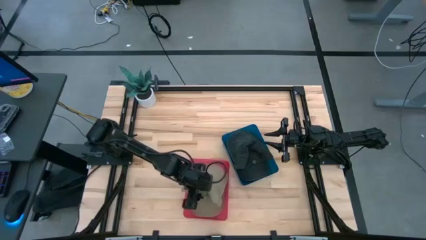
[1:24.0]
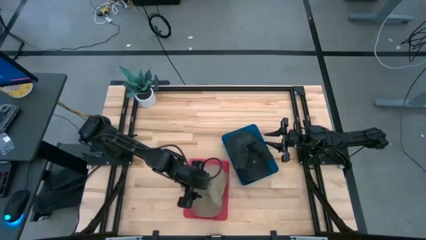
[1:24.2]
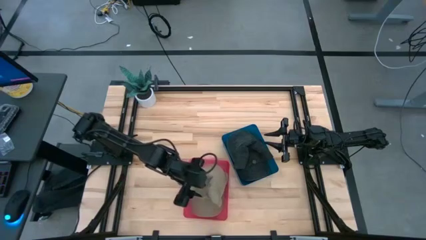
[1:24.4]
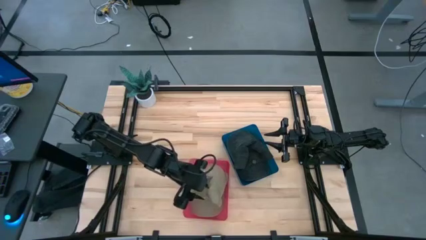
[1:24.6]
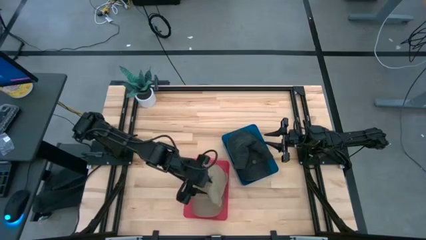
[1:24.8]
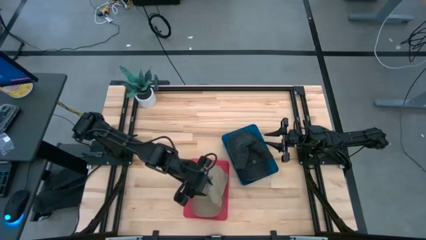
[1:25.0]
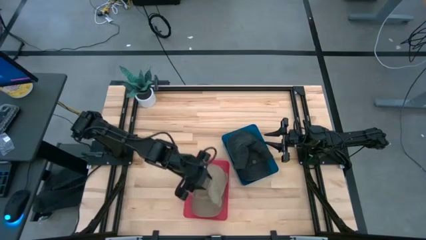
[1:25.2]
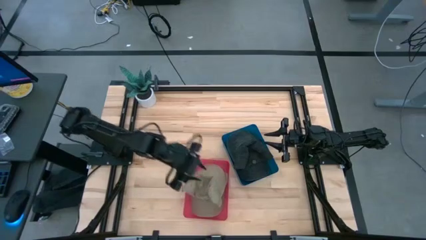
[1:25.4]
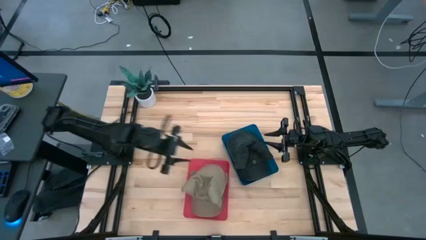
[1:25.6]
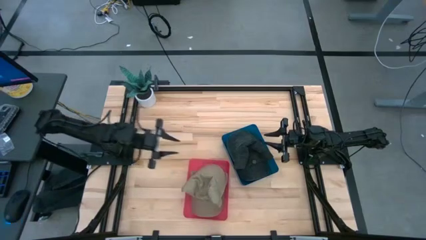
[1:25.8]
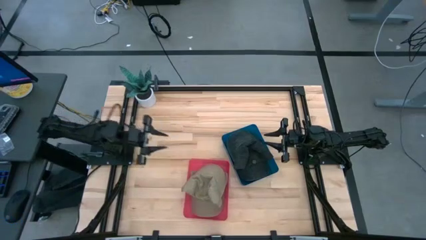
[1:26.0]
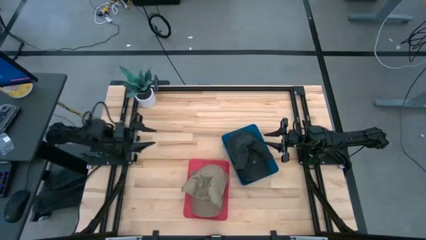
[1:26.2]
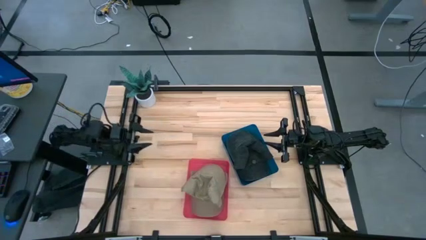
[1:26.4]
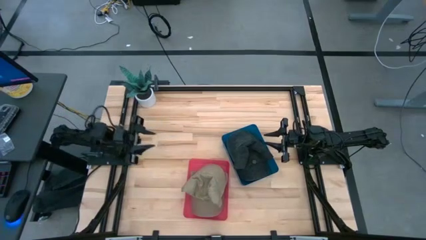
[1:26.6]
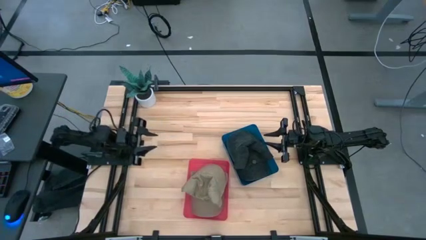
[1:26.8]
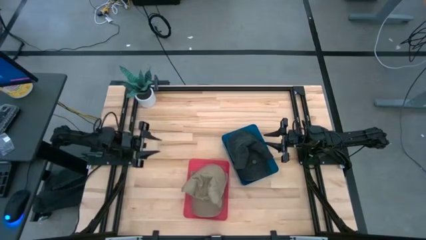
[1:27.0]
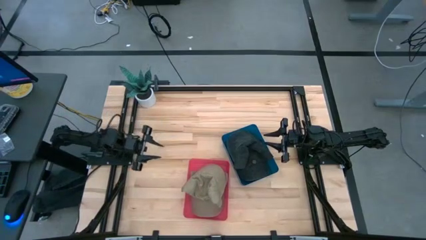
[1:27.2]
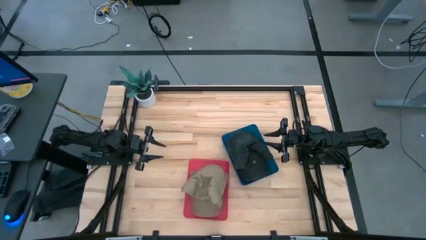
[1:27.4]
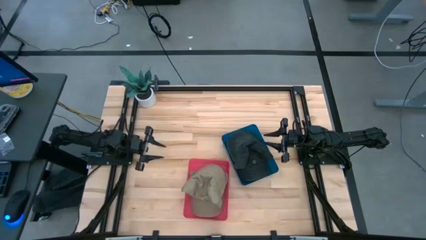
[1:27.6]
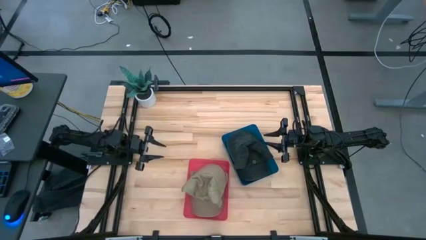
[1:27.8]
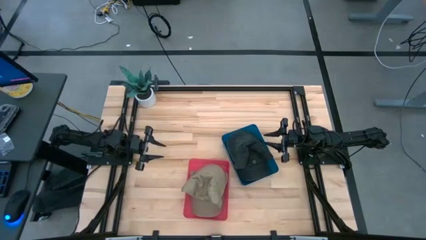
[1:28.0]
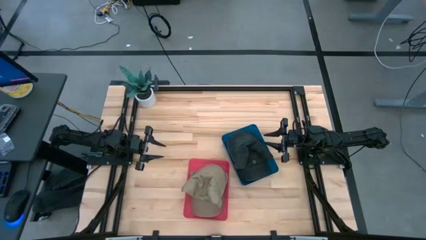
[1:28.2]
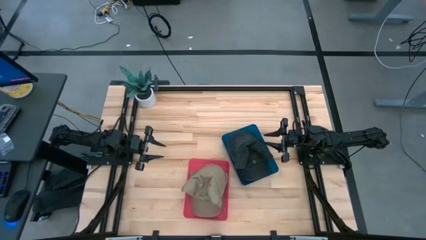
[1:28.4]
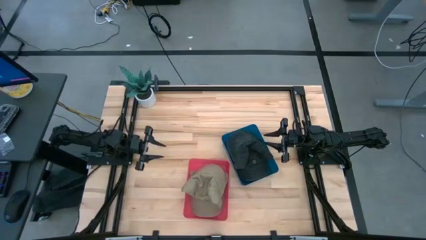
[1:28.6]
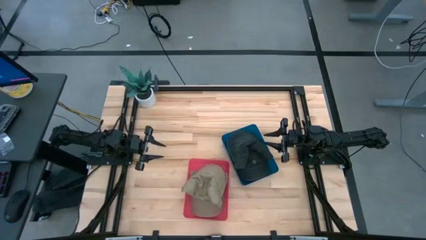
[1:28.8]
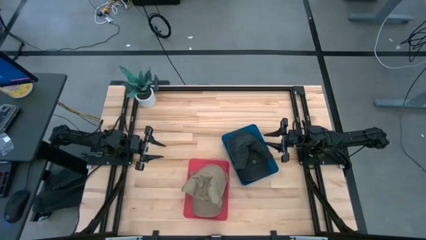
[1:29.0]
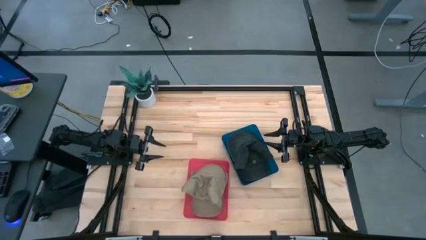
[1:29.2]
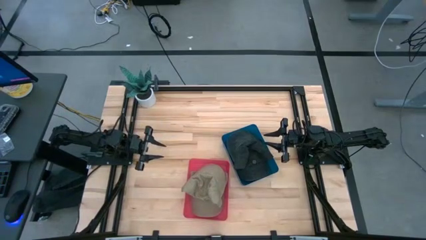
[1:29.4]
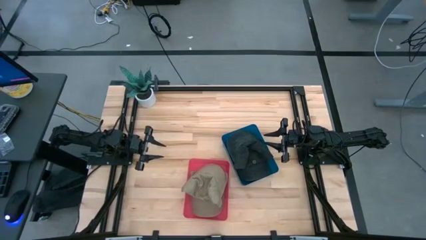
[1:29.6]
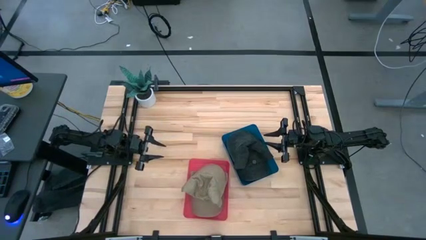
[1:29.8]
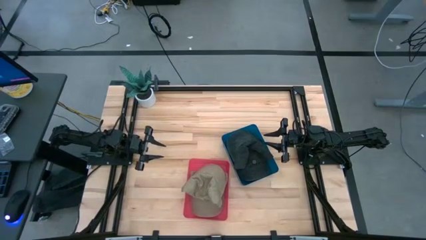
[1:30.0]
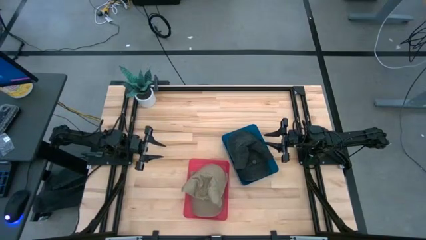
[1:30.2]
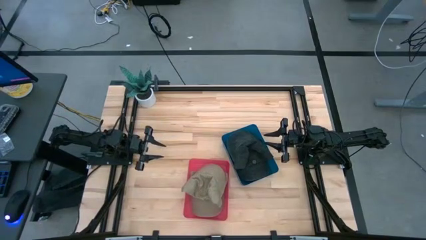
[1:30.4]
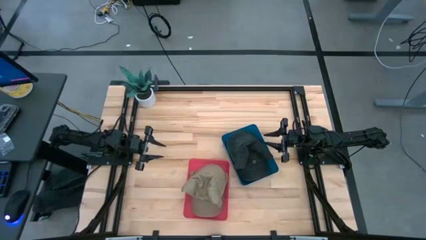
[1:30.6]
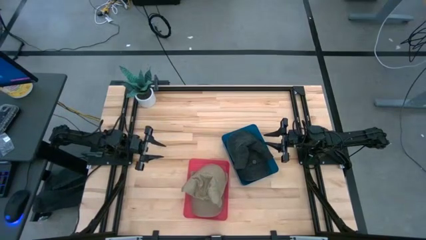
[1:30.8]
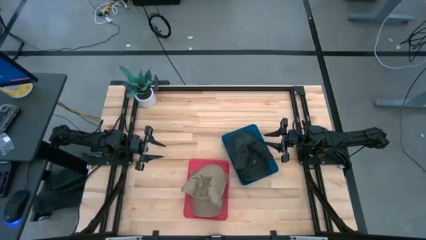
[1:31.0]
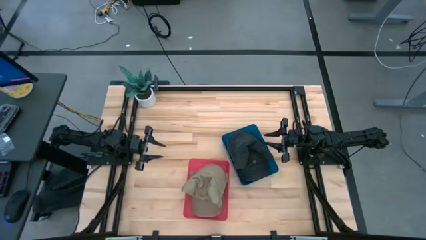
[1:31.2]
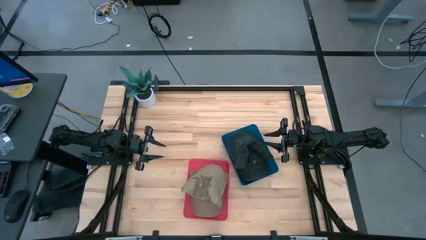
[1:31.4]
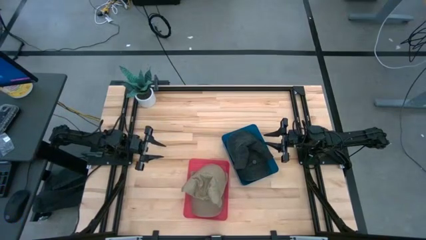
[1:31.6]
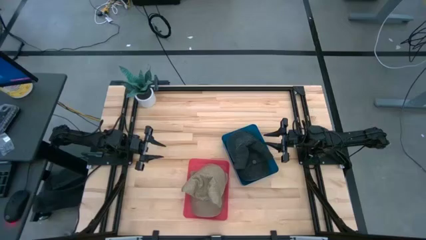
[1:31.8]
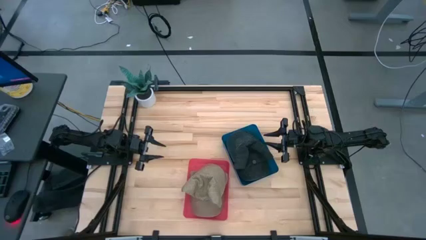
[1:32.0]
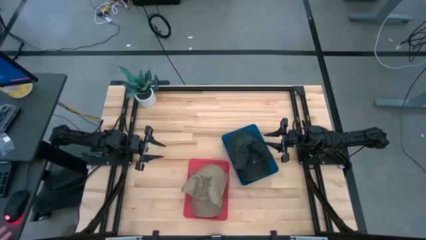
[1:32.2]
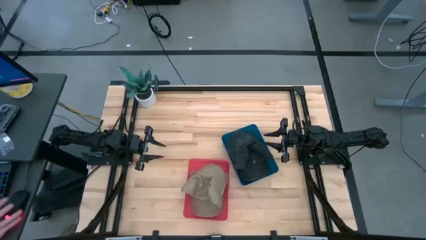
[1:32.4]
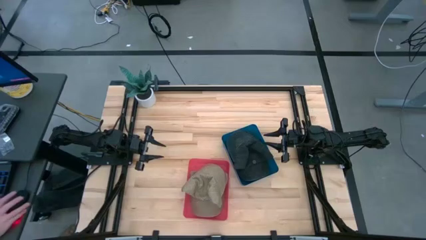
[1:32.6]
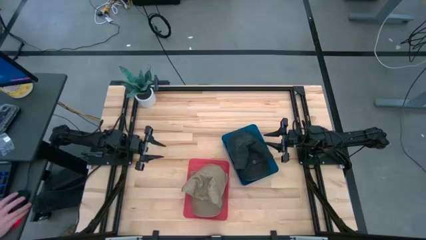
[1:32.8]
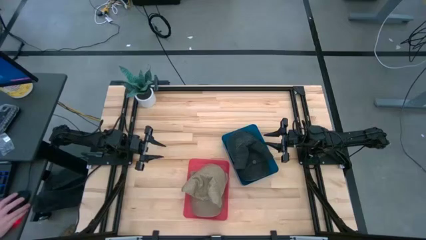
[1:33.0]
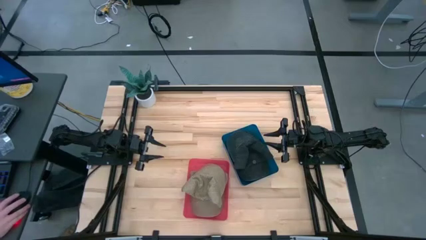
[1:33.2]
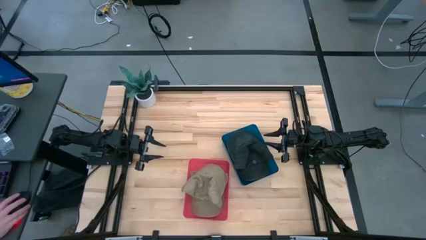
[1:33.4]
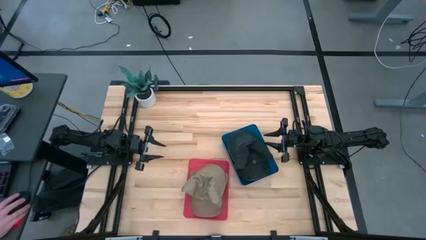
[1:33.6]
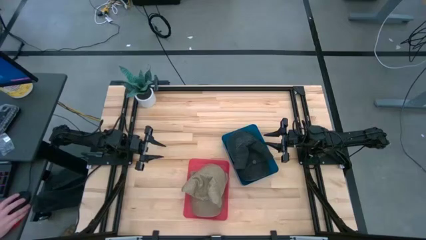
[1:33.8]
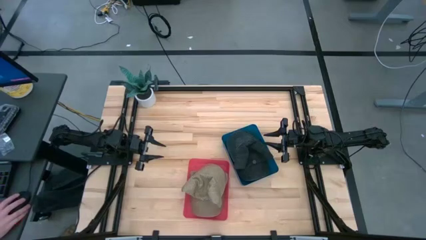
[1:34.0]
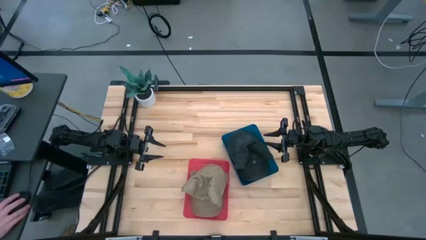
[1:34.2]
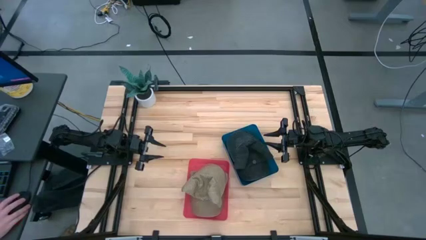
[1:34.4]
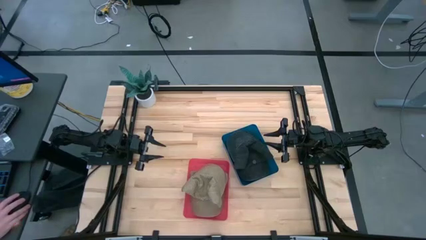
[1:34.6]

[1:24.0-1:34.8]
Task: Pick & Place hat
Return to Home Position

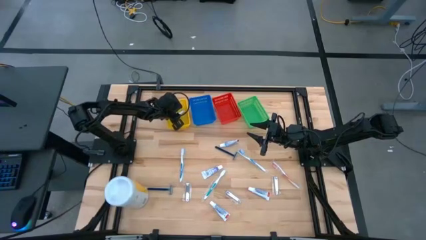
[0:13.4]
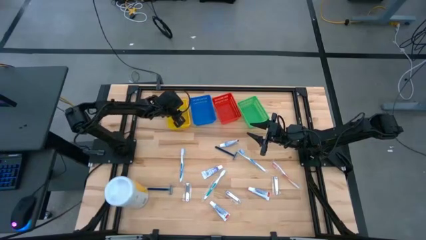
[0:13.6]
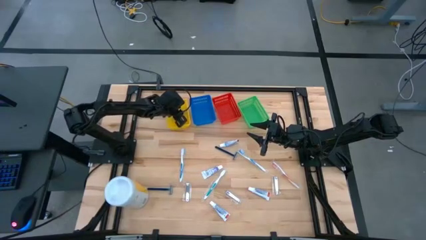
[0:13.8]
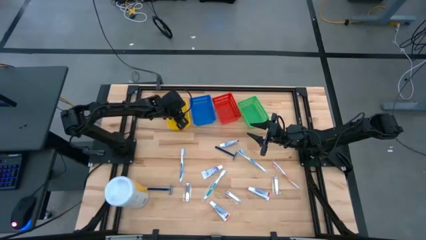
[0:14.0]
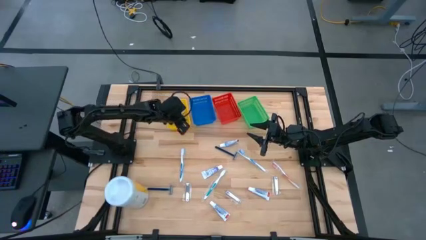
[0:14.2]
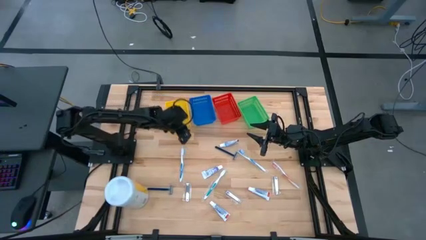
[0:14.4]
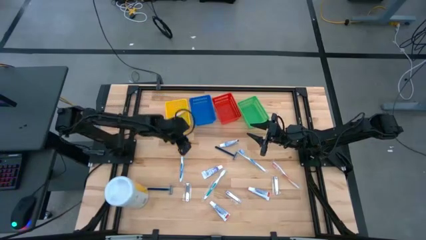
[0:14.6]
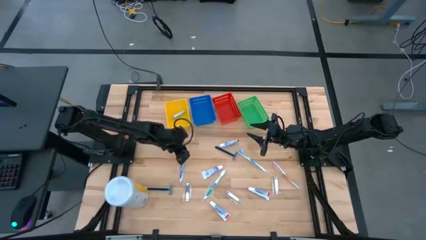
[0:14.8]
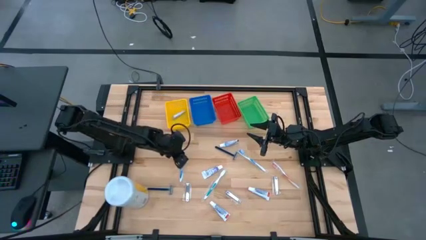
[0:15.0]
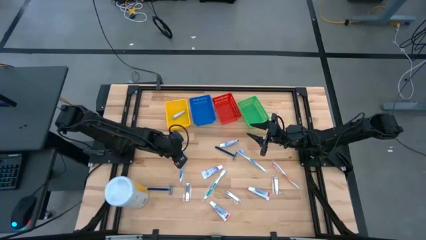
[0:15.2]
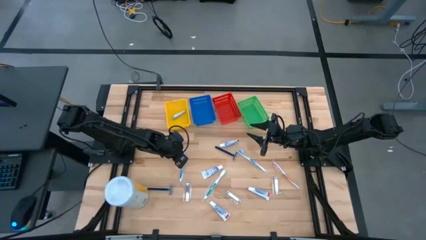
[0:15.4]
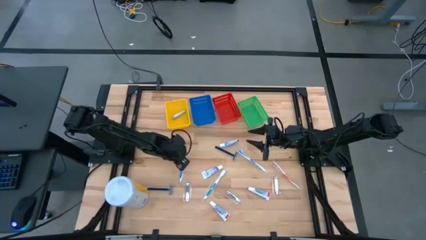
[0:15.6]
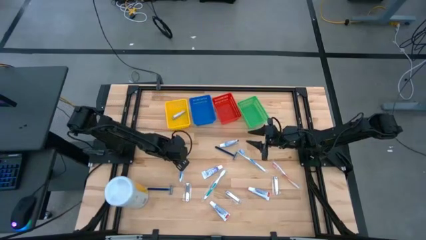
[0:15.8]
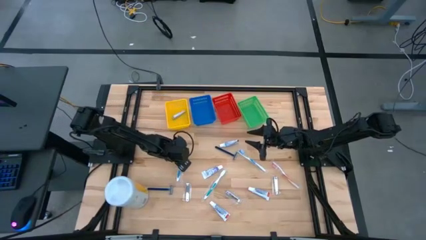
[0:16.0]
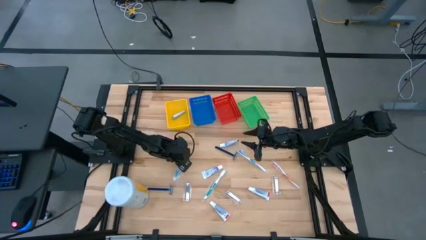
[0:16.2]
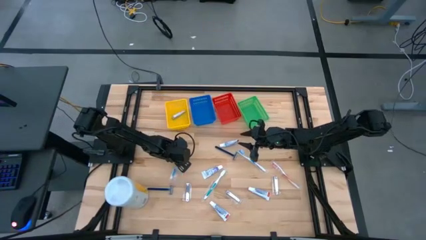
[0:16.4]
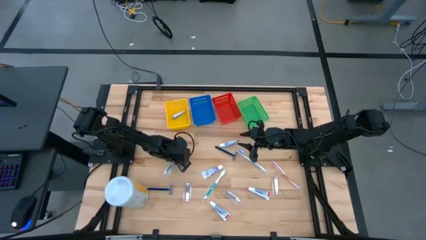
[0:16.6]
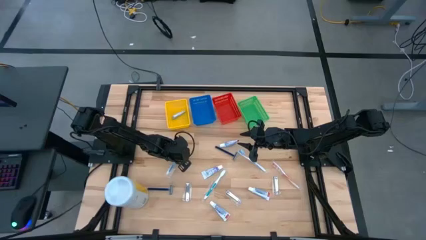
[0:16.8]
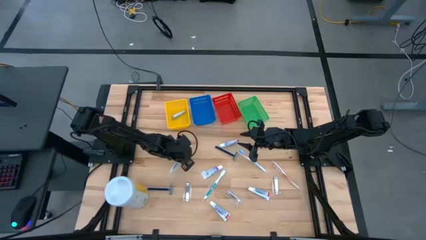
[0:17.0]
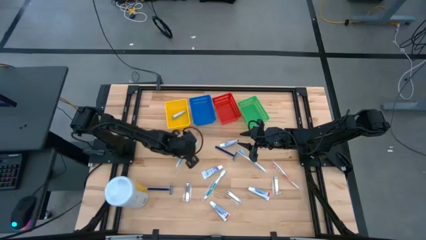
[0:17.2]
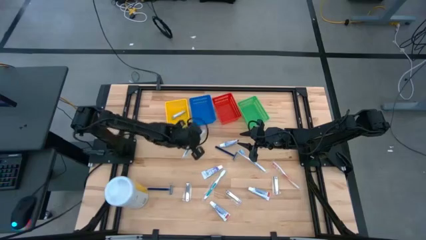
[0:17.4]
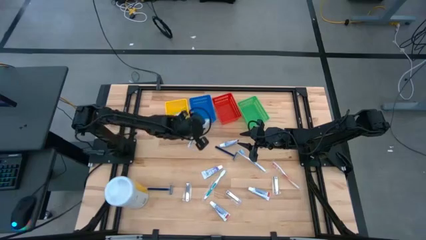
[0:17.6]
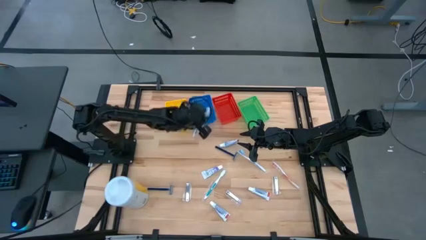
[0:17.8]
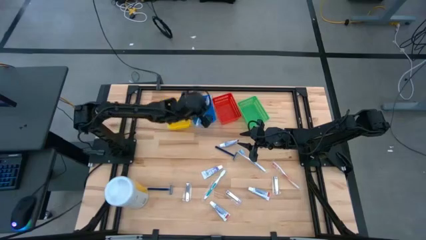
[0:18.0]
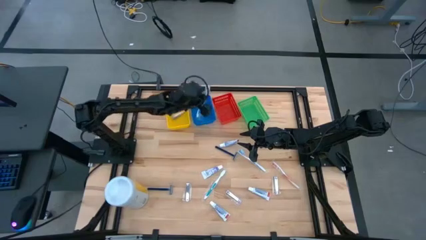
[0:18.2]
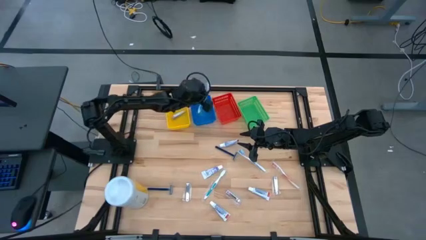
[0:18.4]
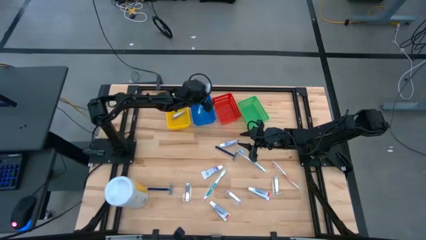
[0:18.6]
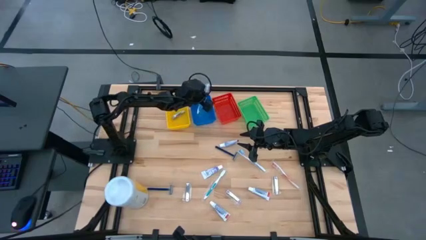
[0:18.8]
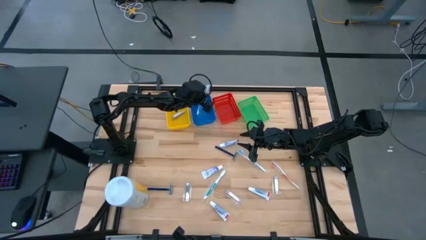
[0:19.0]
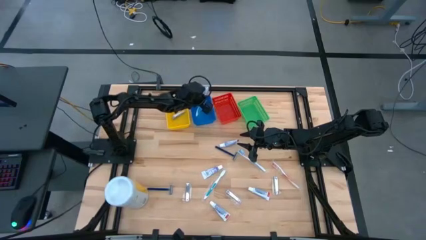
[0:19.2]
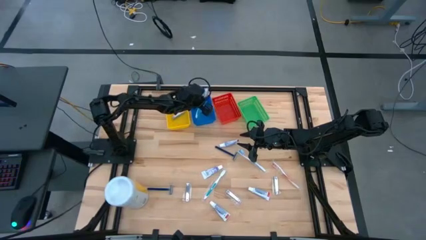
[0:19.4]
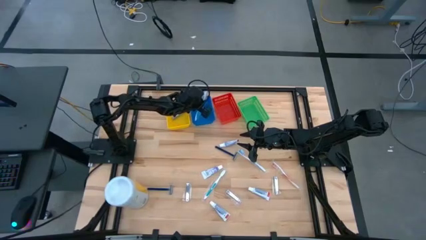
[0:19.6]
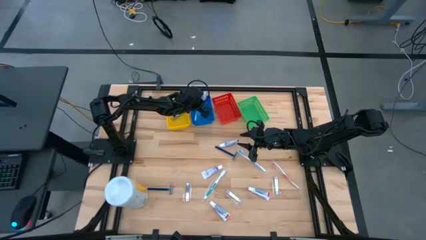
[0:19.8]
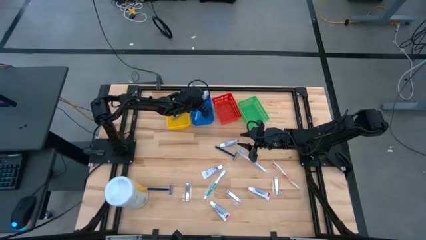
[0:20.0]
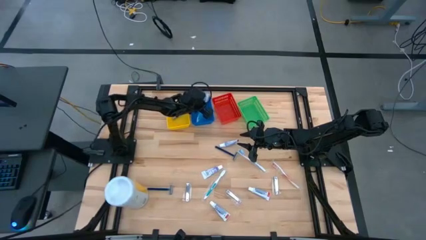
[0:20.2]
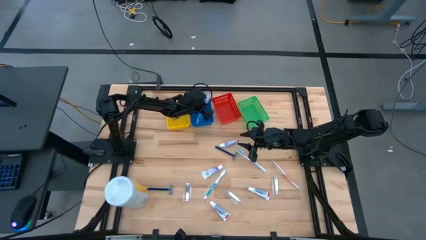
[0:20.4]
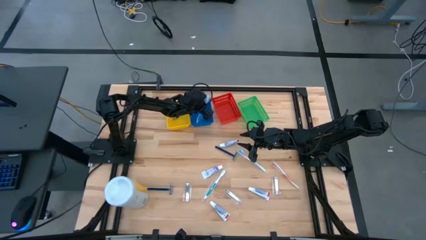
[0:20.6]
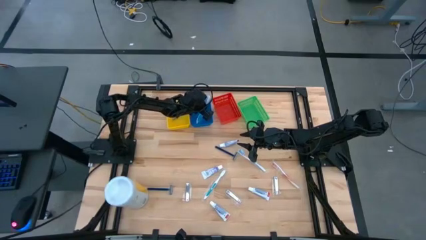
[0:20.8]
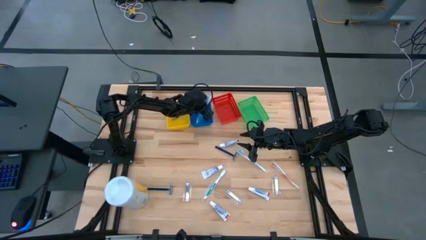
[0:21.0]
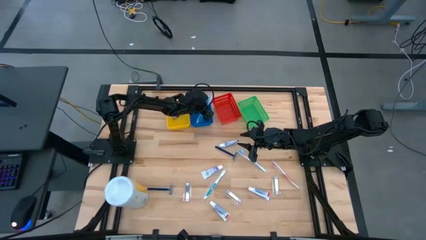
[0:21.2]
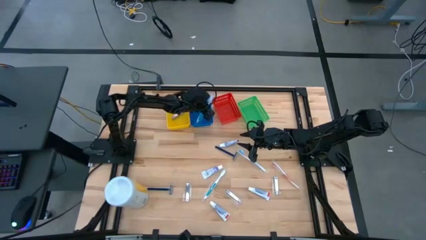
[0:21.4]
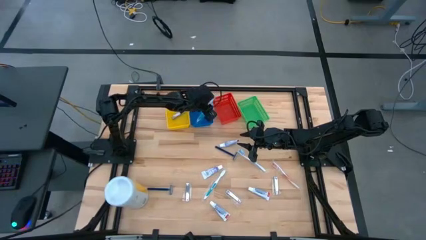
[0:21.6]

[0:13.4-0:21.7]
Task: Pick & Place Travel size toiletries
Put the left blue toothbrush into the blue bin
